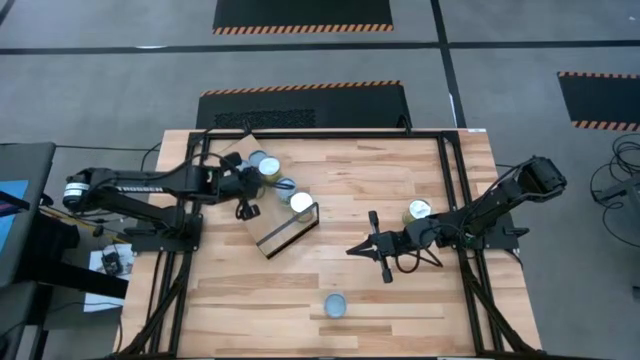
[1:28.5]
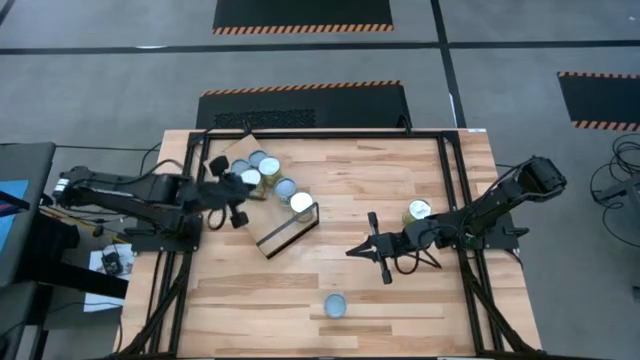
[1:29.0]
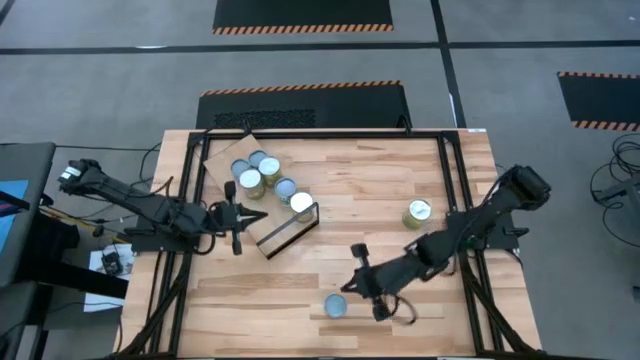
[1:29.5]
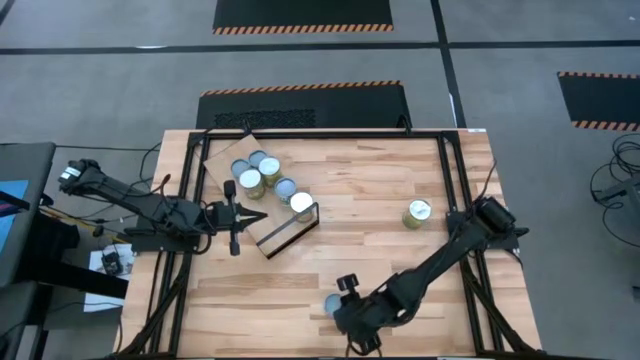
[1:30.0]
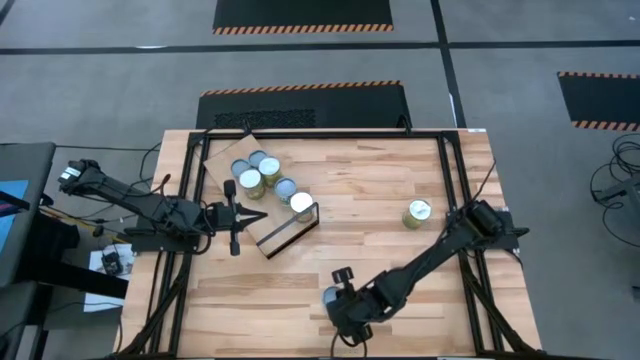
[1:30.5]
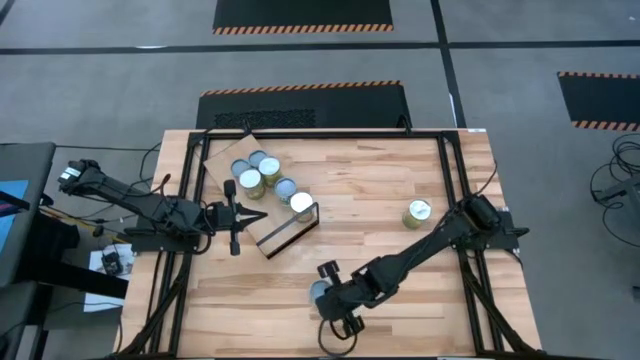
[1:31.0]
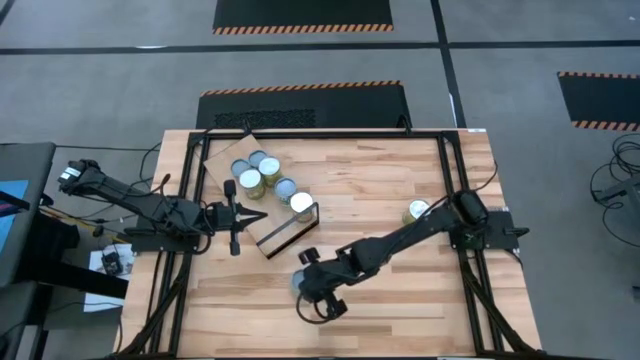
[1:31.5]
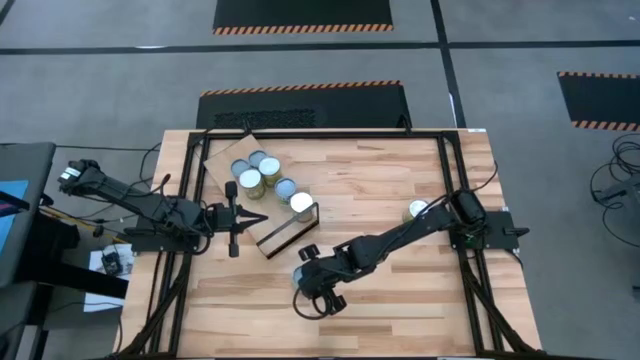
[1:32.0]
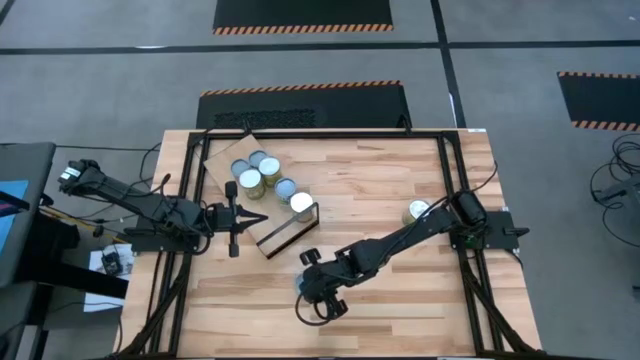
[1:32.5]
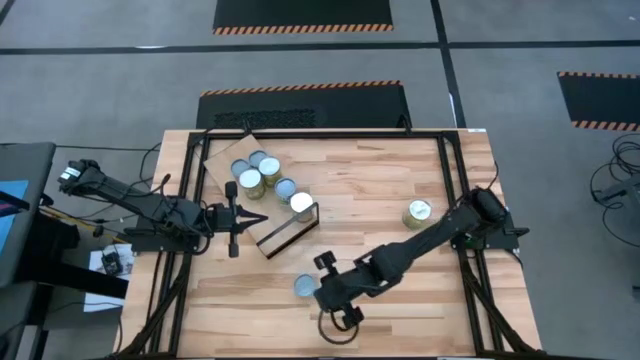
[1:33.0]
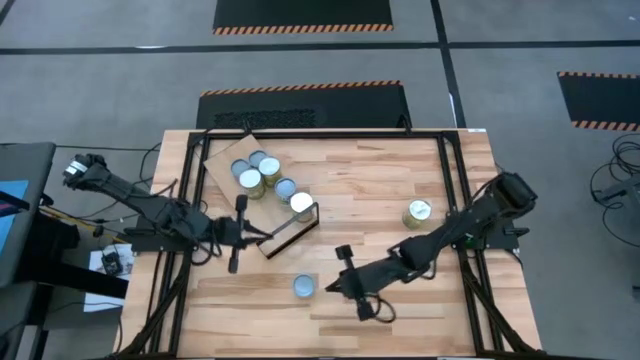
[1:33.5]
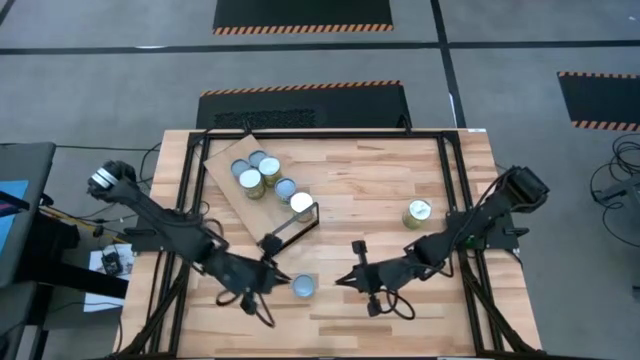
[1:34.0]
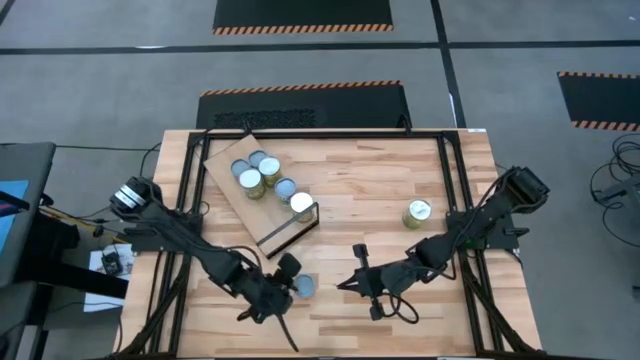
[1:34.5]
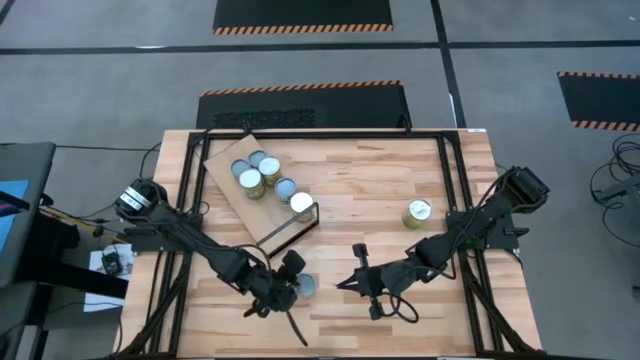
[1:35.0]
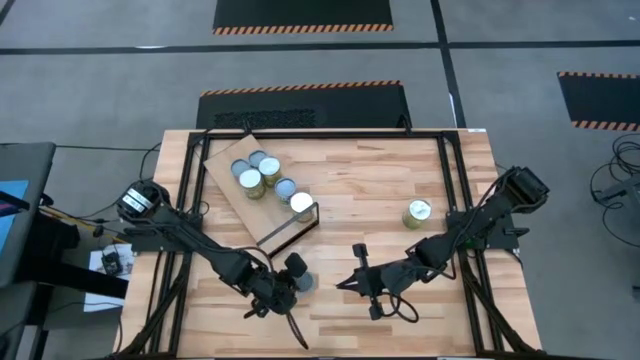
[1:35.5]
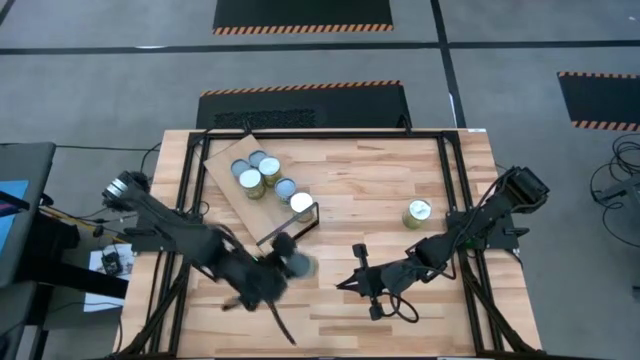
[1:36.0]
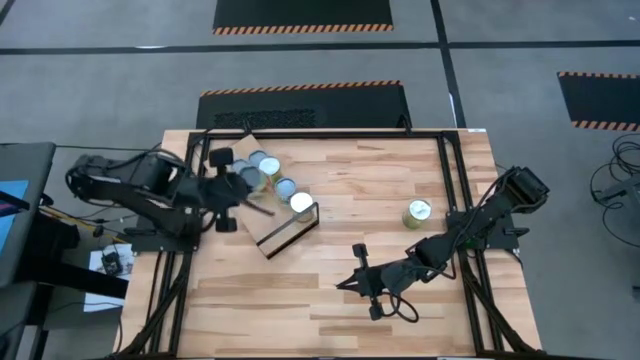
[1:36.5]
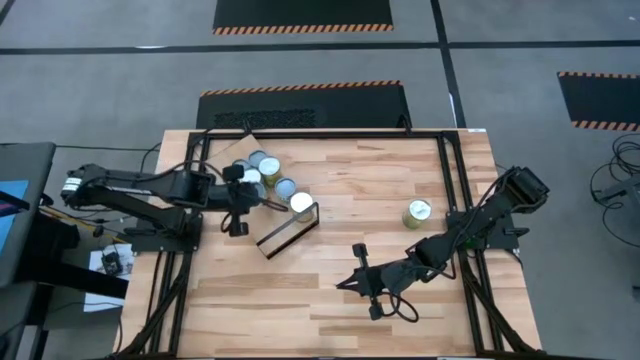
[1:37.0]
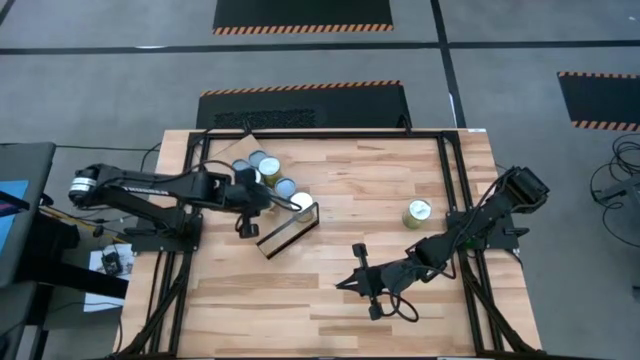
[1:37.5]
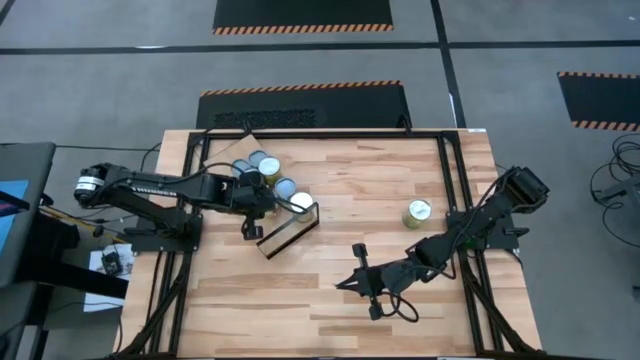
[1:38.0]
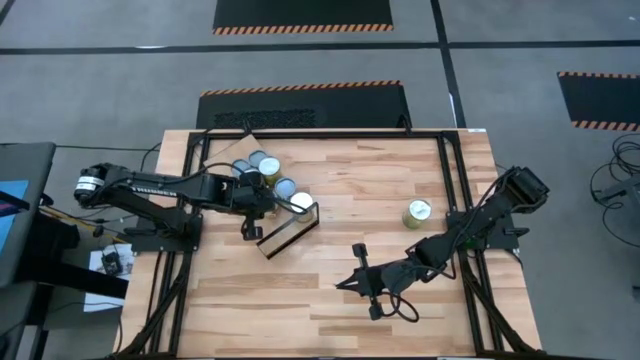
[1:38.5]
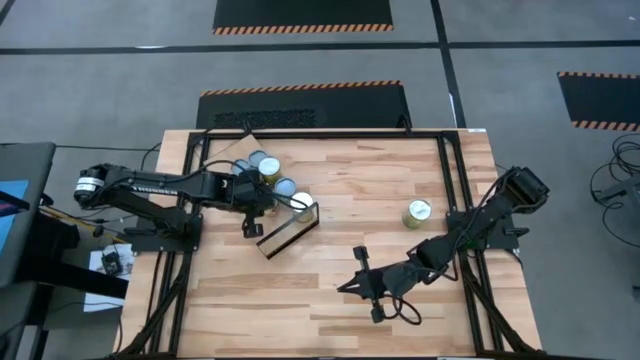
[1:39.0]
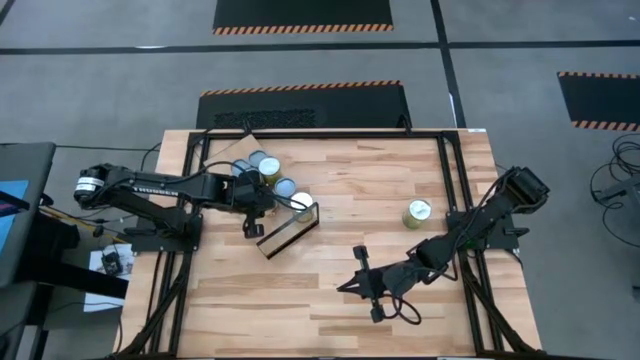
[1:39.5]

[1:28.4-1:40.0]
Task: Pick and place cans onto a shelf
Put the canned spaghetti sauce on the shelf

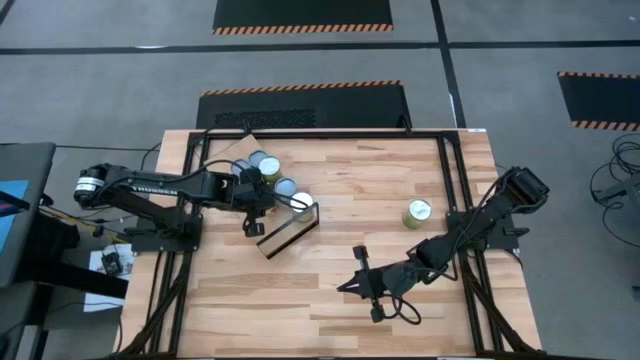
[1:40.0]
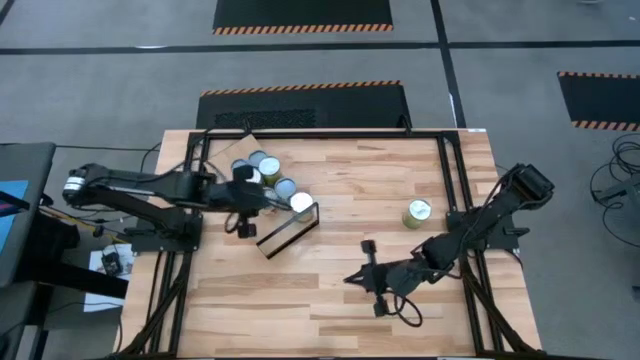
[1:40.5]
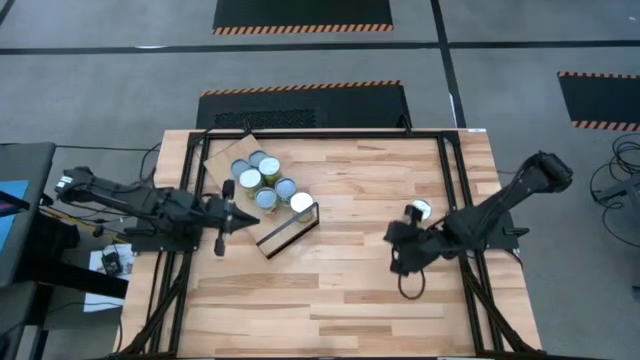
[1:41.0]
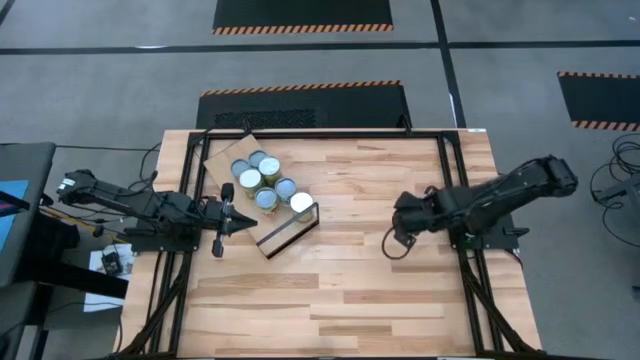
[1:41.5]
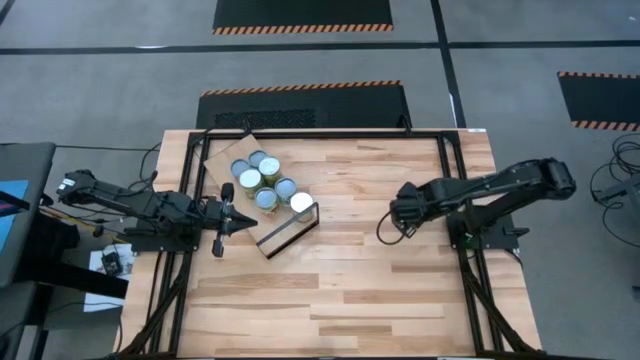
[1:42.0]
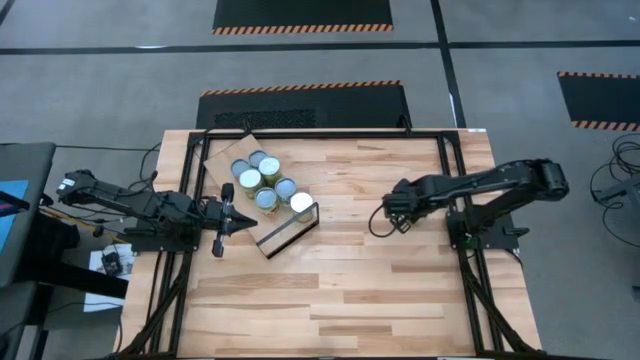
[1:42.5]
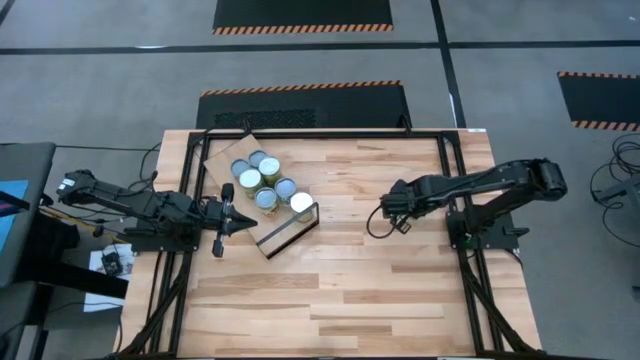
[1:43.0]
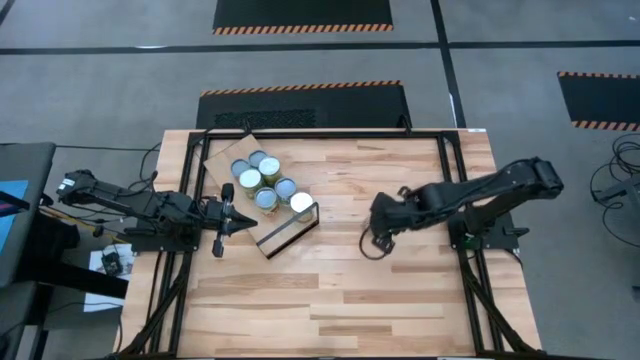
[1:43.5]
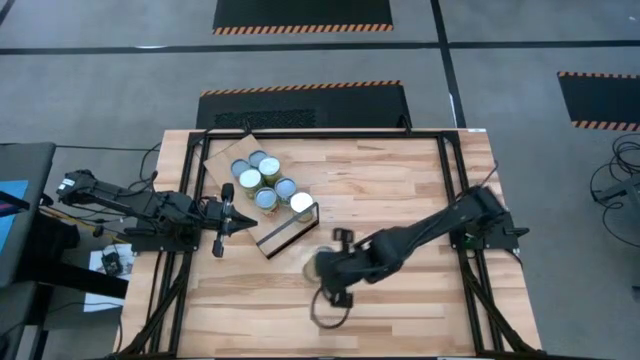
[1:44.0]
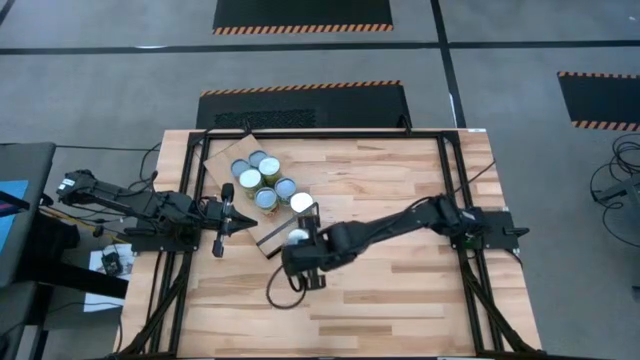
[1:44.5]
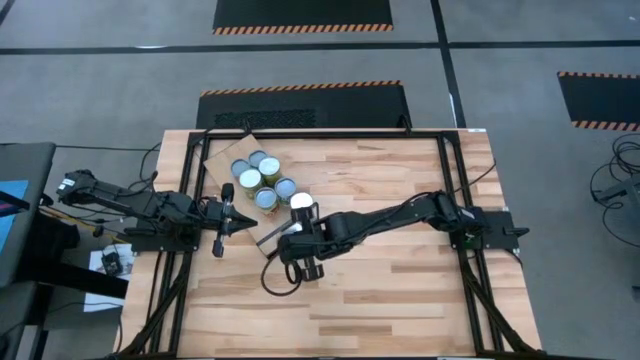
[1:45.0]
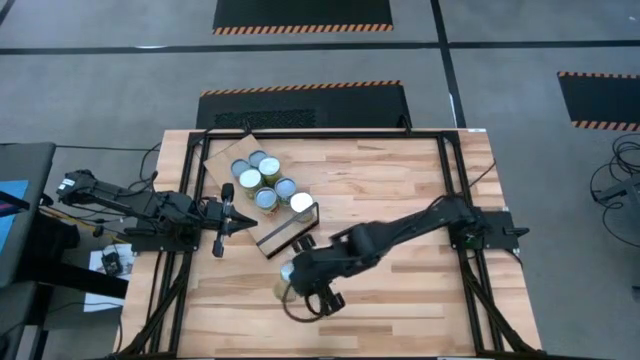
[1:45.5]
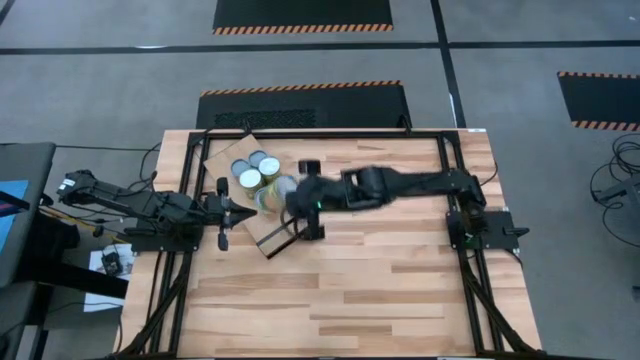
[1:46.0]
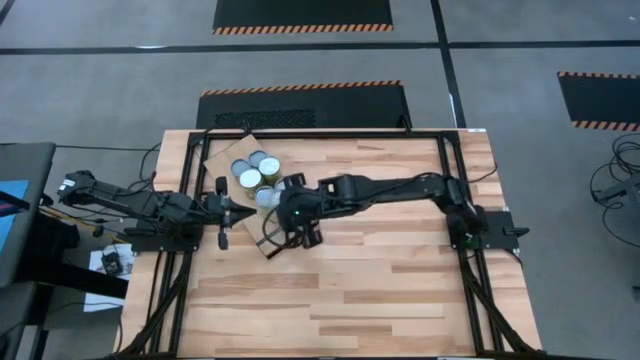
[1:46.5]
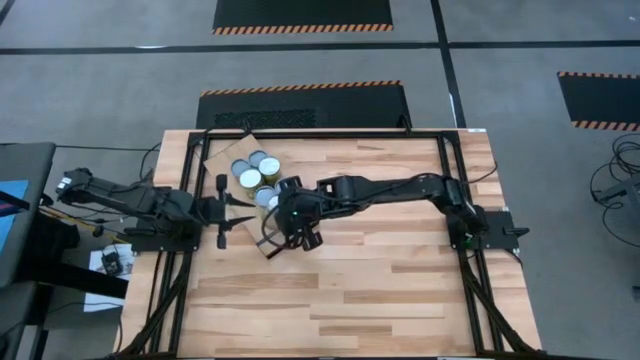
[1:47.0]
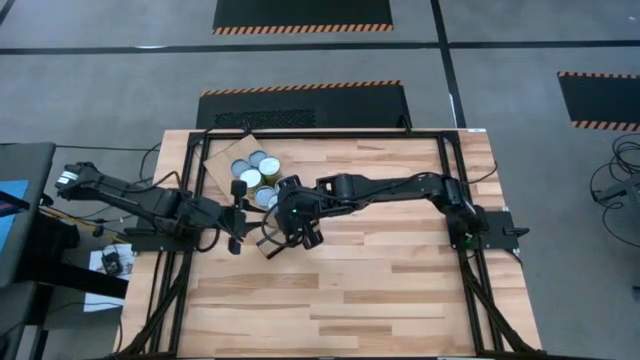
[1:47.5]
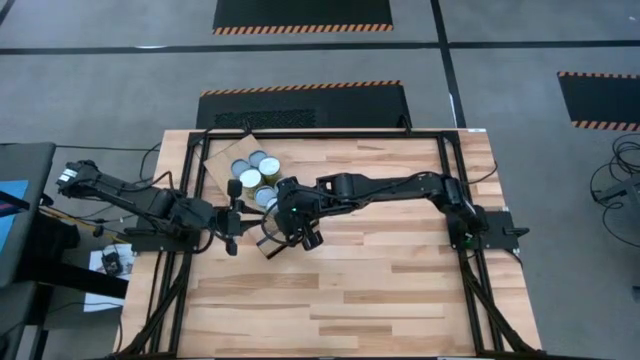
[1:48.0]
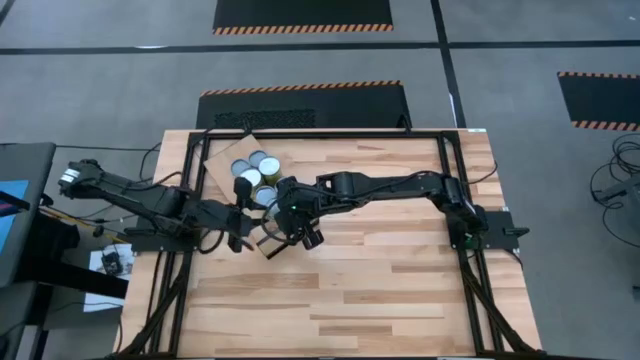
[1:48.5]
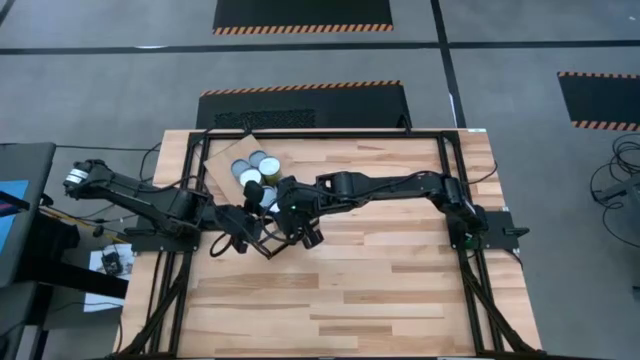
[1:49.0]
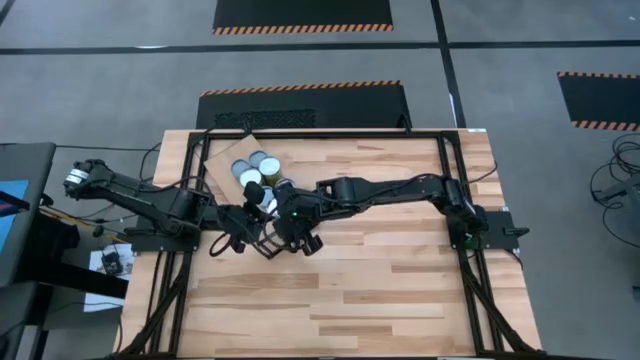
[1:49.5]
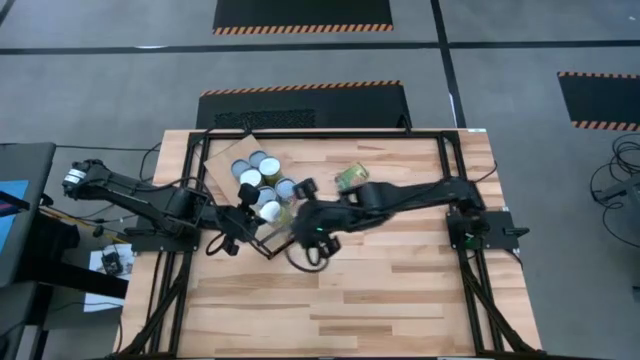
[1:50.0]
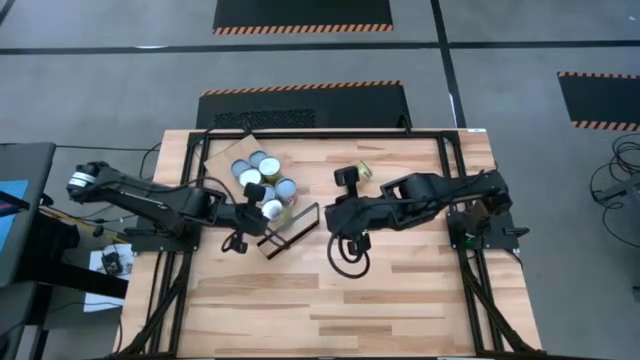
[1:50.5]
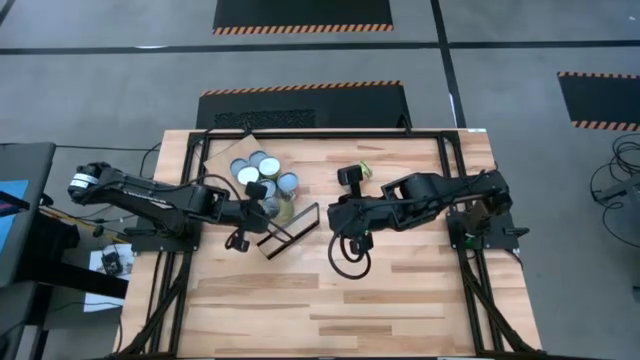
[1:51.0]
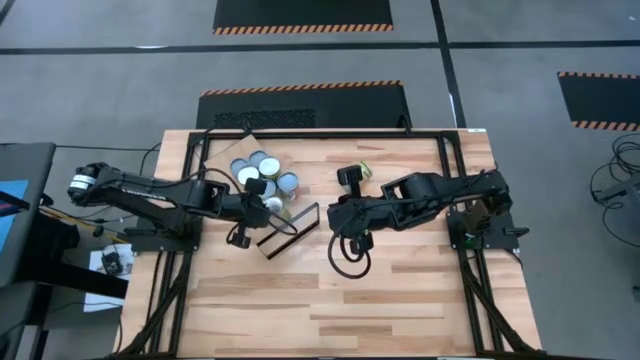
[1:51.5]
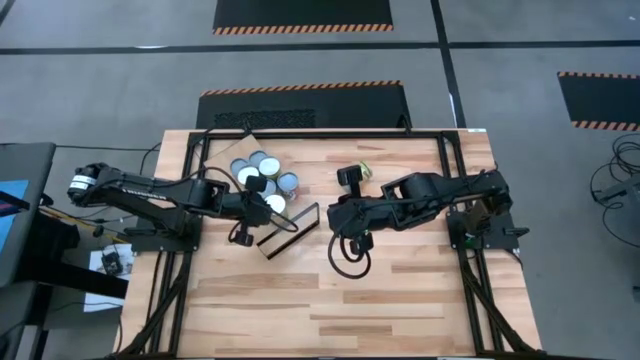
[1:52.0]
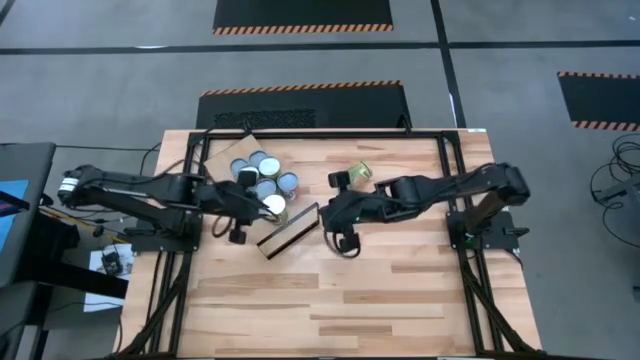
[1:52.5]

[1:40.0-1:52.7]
Put the large canned oranges on the shelf
